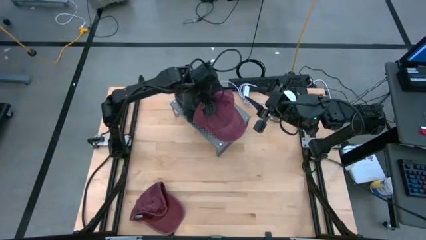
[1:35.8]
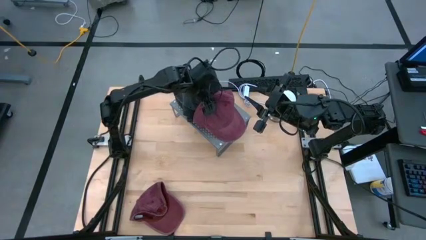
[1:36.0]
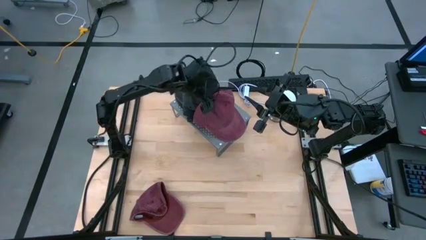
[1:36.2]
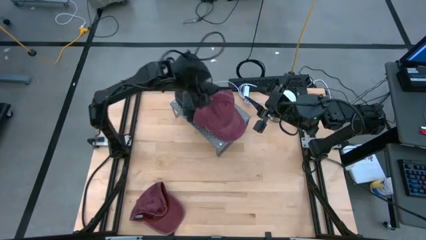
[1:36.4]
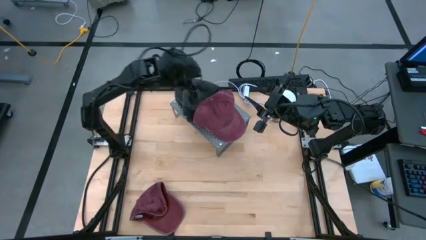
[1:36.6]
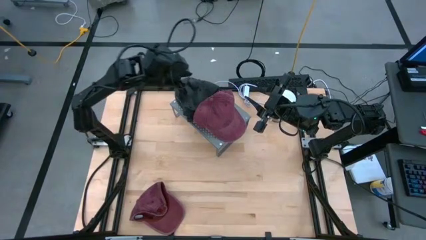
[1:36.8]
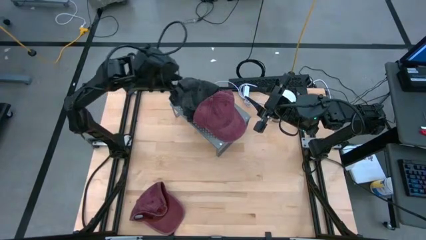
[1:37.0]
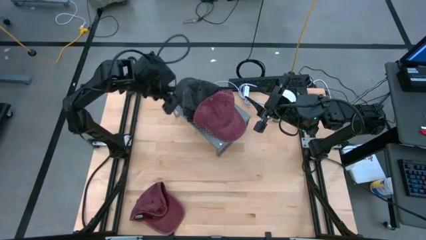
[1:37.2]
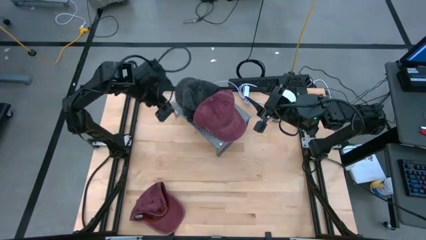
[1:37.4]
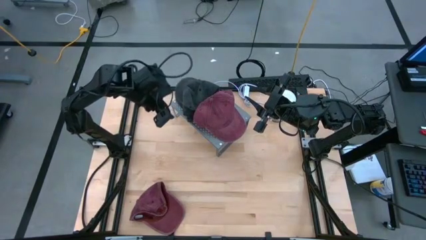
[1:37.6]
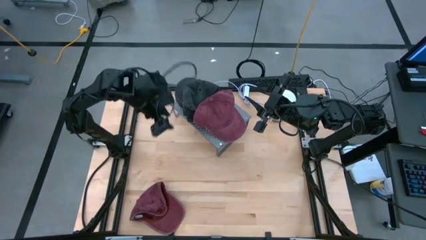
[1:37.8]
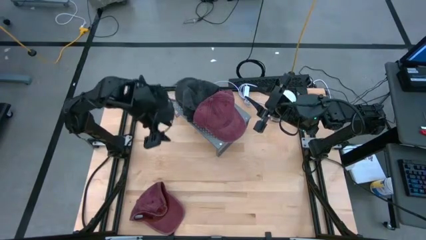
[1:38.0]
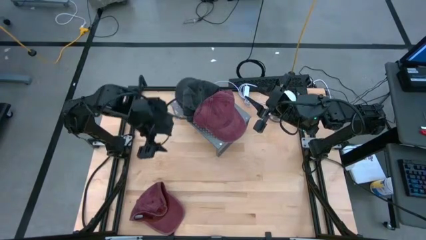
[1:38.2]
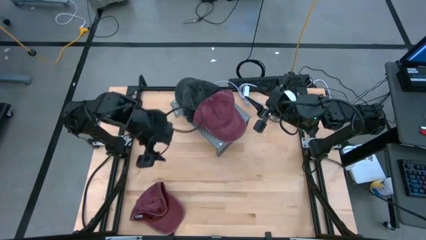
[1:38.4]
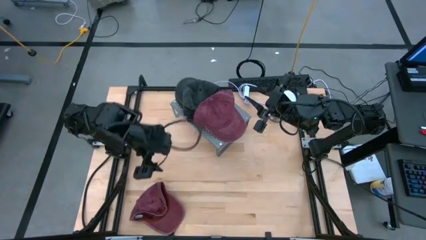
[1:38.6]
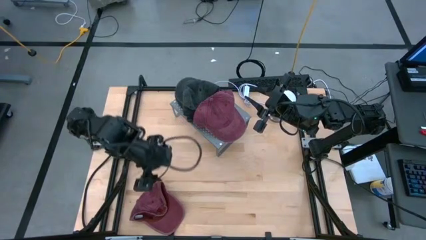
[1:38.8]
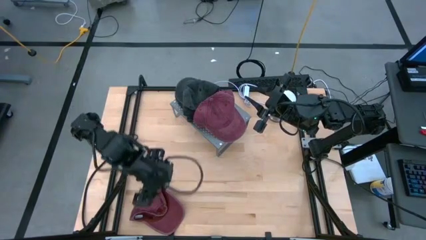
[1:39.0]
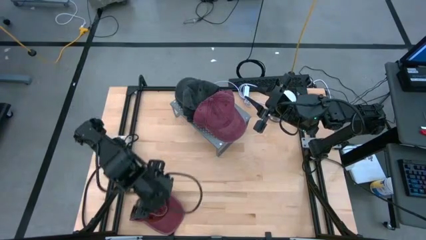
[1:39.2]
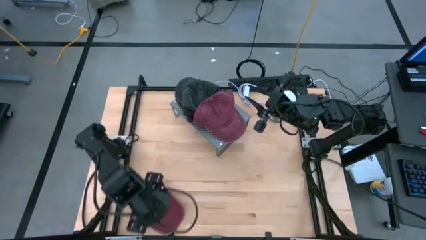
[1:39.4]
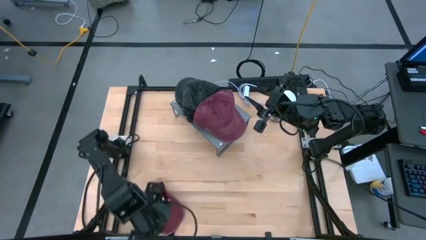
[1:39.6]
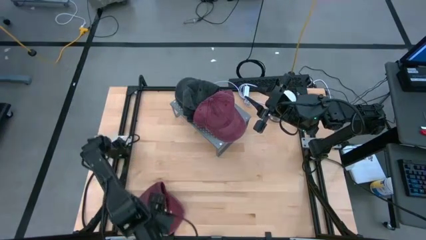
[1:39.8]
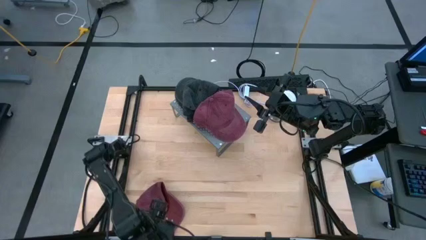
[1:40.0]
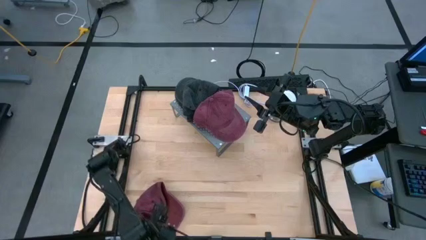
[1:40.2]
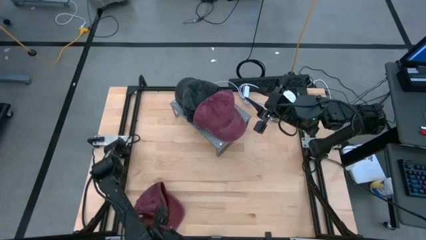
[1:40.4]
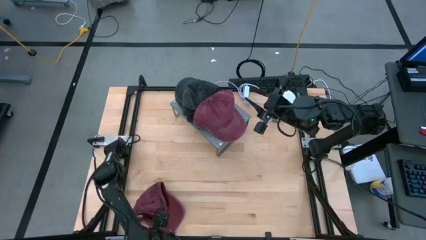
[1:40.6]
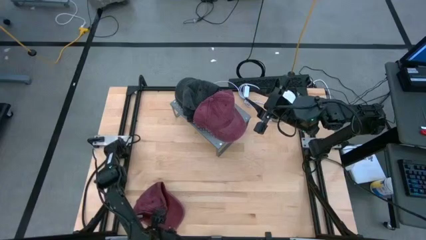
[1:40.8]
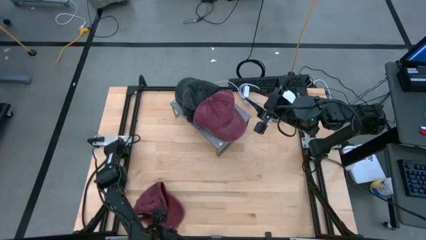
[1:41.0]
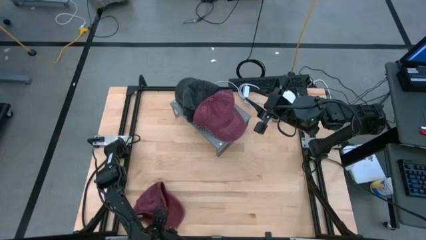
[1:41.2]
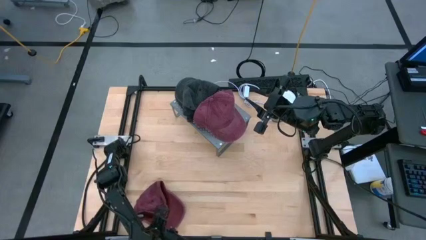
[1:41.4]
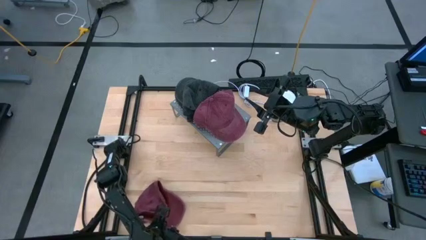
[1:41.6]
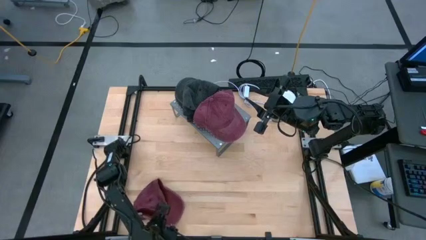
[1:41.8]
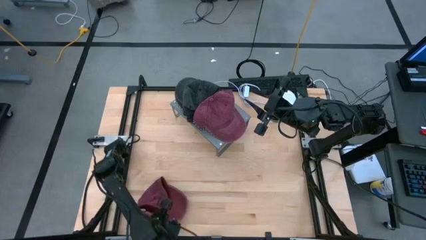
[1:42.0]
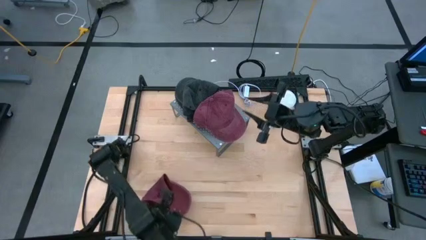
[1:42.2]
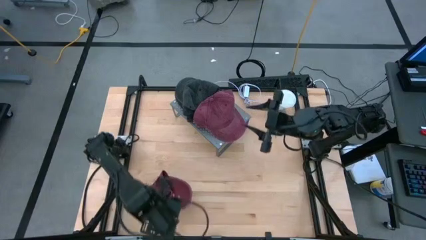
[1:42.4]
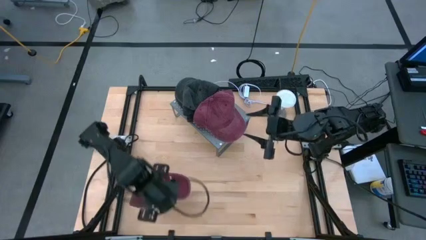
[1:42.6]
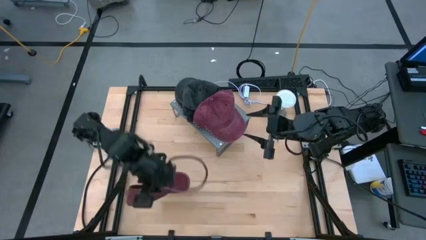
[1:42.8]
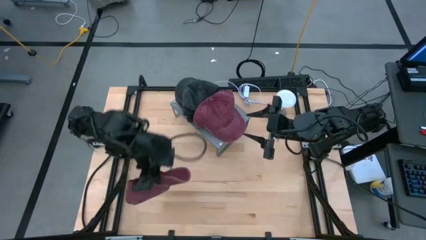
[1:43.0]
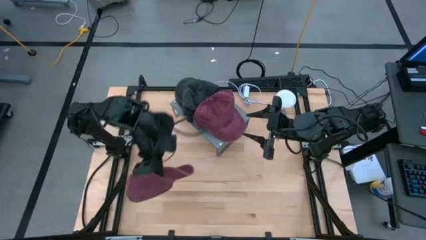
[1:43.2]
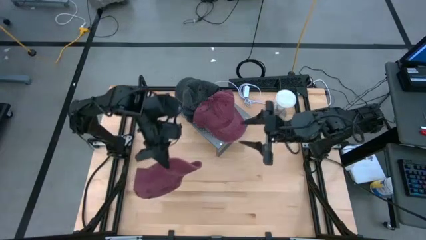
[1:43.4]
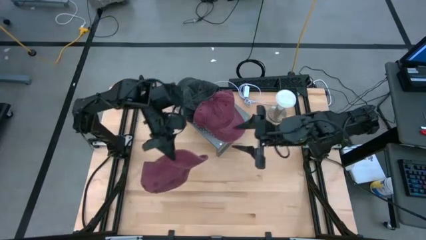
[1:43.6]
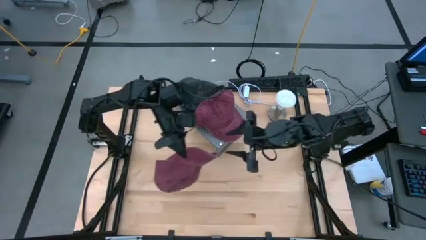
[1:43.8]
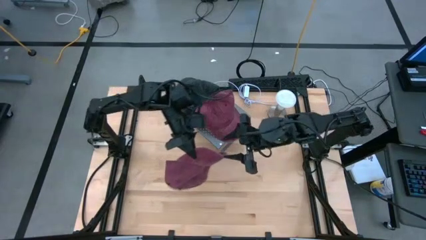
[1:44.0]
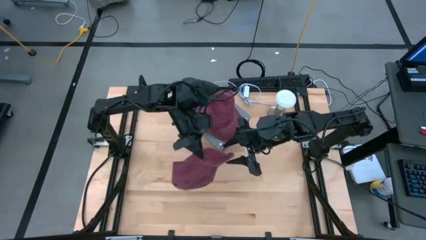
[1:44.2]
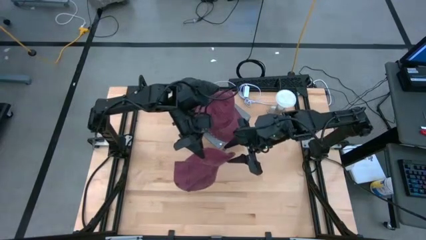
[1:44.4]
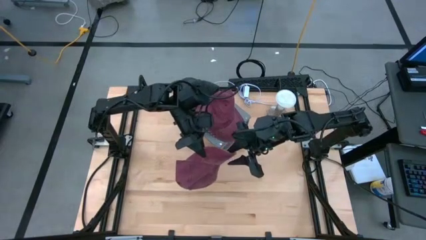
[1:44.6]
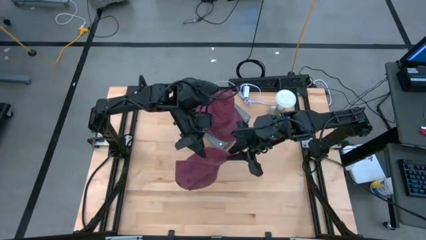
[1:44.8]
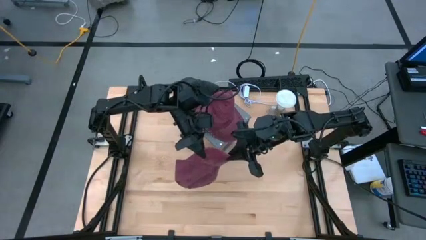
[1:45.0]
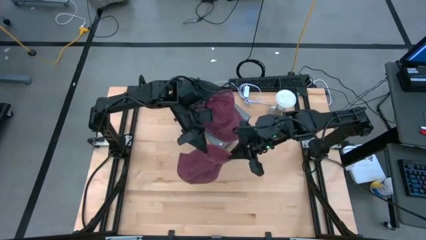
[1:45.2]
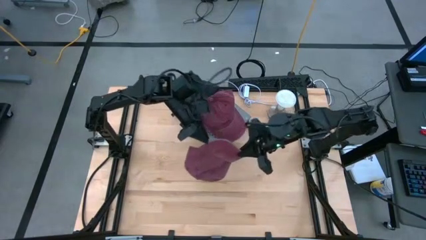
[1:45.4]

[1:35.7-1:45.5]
Task: Pick & Place hat
Stack the red cap on the red cap on the shelf

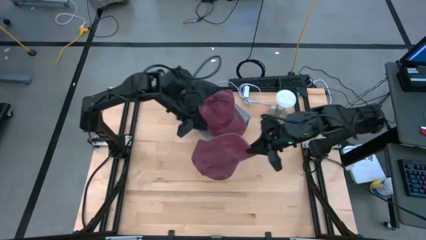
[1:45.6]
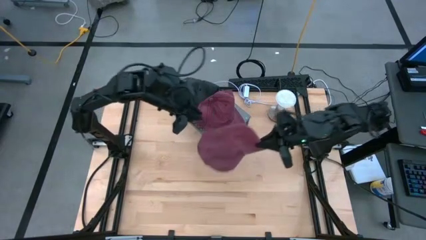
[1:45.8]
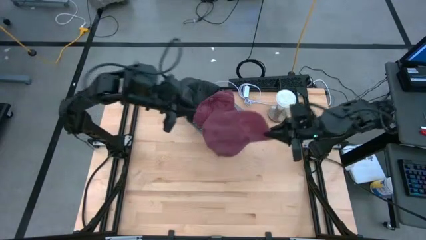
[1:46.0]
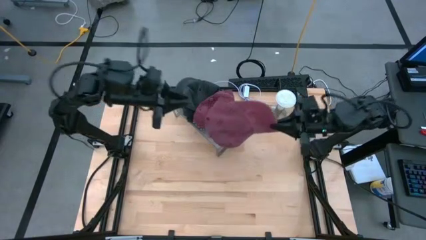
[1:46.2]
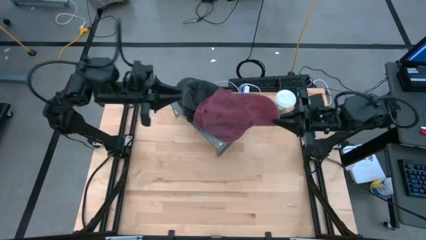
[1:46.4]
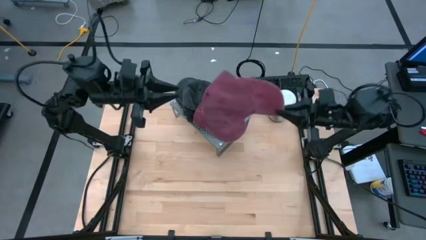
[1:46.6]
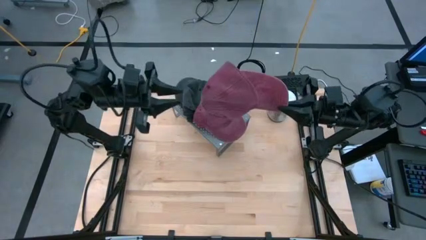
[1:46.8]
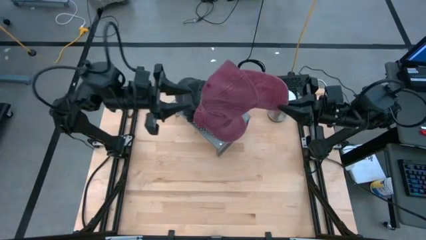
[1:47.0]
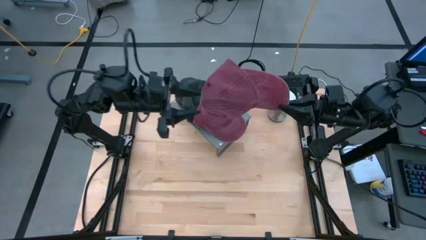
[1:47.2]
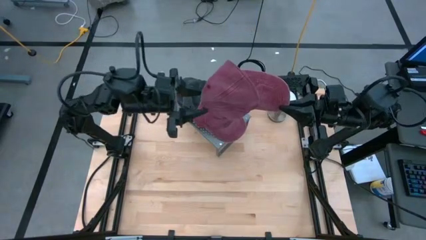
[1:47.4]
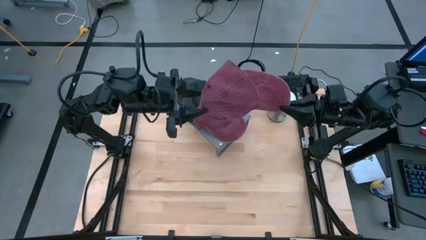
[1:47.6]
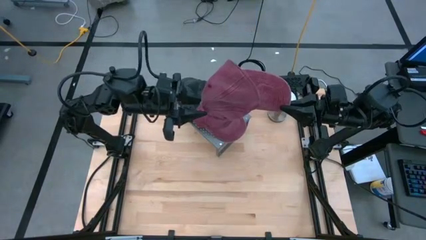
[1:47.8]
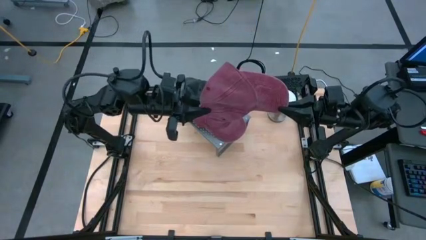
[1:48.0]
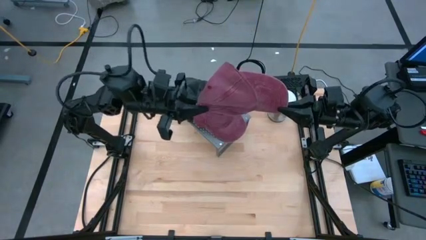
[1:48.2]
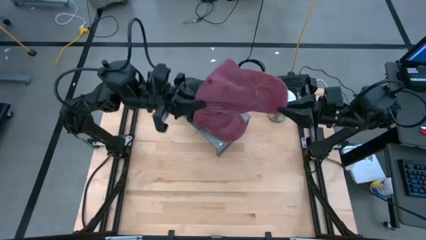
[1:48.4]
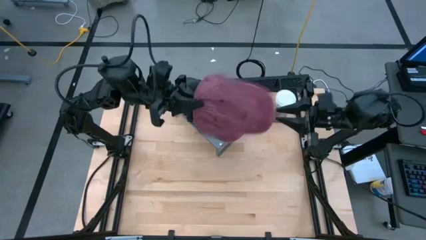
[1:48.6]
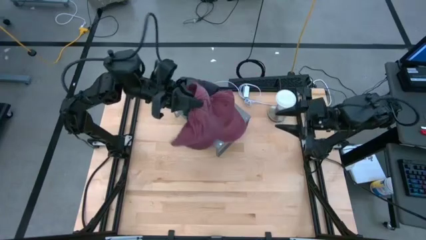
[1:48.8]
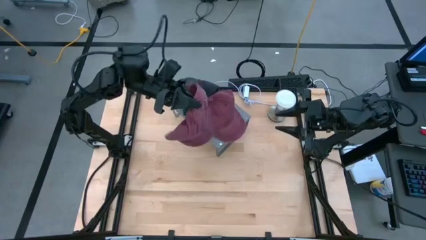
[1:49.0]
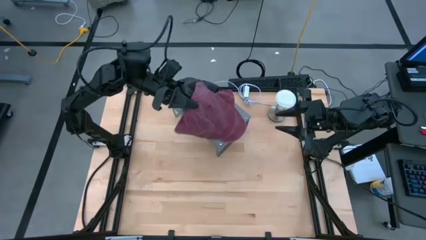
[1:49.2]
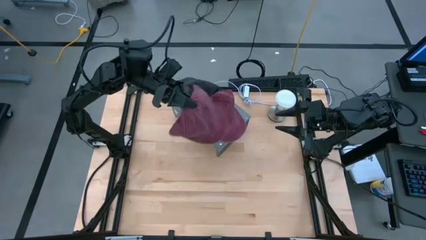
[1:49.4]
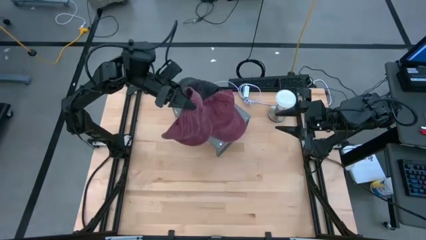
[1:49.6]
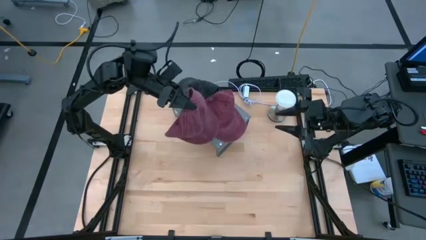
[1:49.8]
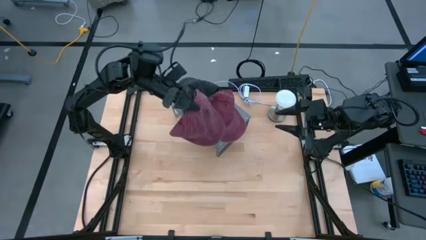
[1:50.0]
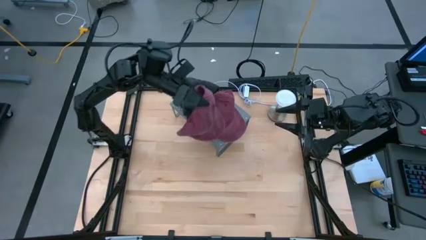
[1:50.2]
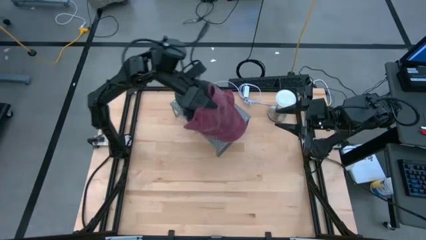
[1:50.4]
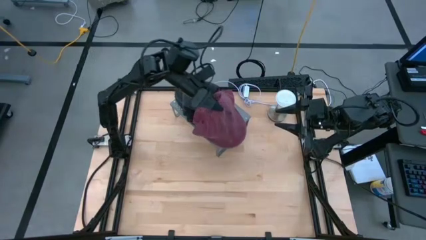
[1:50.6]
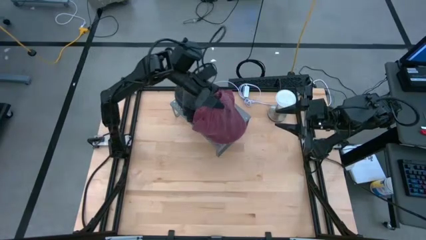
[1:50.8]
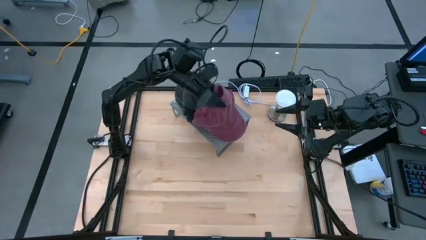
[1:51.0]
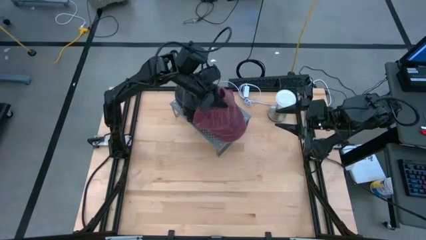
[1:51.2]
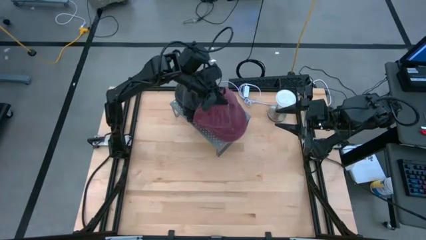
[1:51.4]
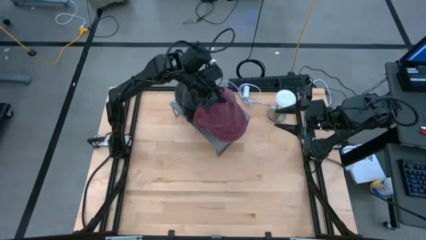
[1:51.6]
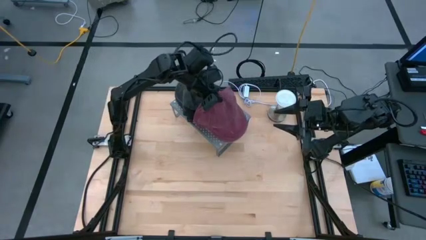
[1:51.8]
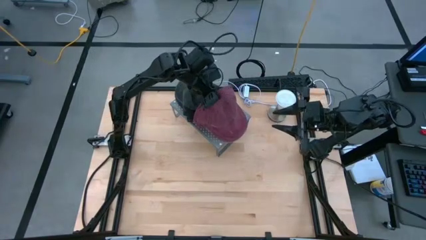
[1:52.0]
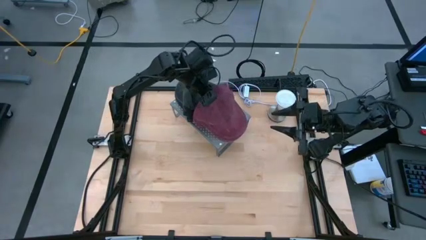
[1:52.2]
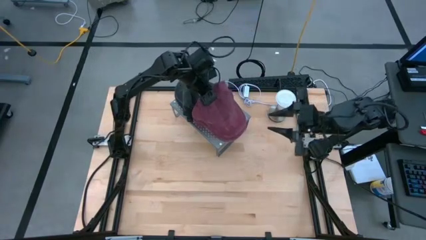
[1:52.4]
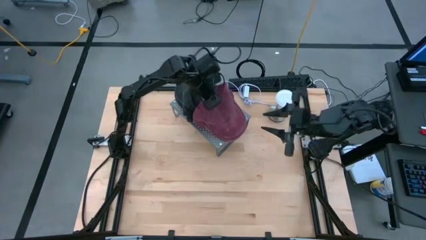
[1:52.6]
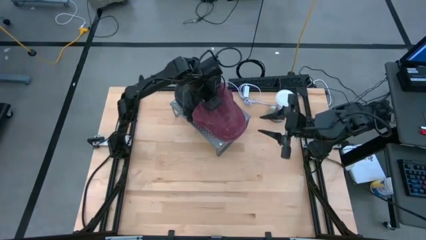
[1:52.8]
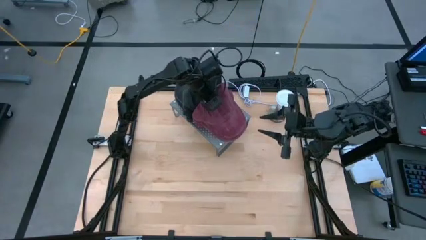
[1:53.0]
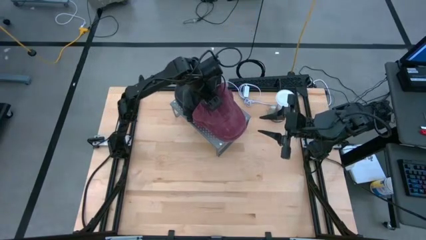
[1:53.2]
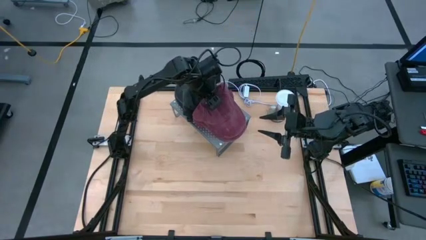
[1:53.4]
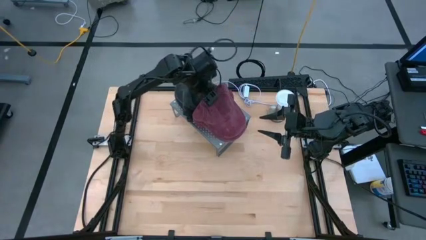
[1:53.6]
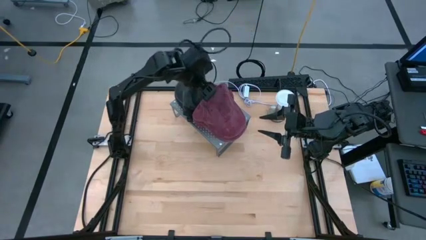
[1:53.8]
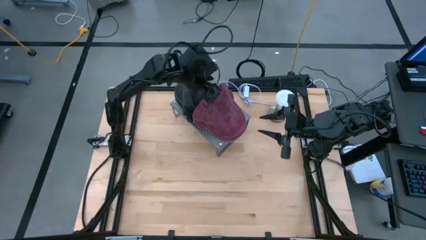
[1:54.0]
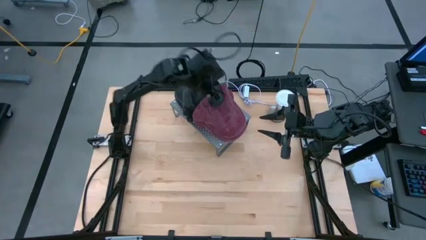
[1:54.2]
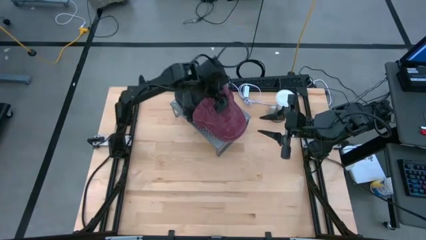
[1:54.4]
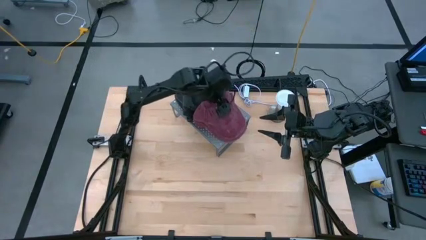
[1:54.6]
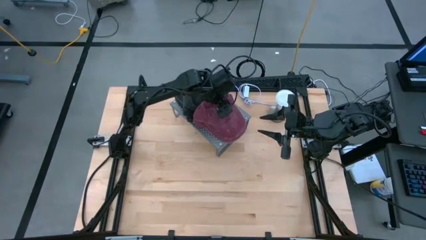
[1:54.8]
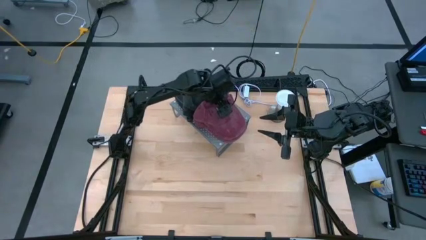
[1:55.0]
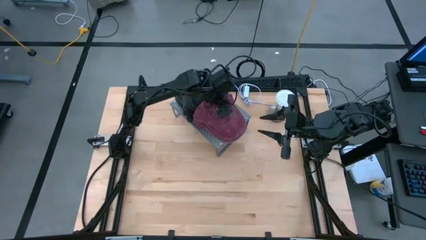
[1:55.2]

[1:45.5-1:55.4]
Stack the red cap on the red cap on the shelf
